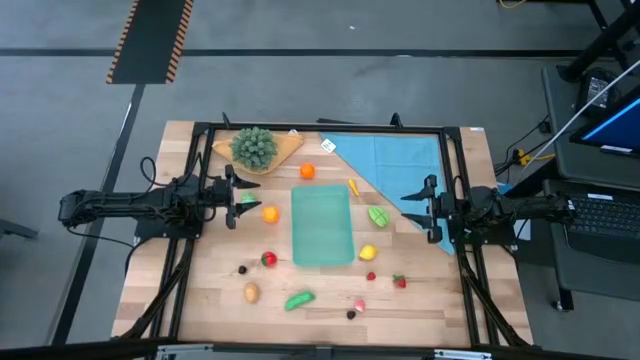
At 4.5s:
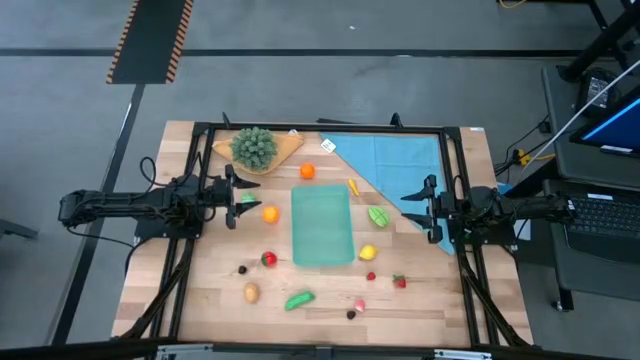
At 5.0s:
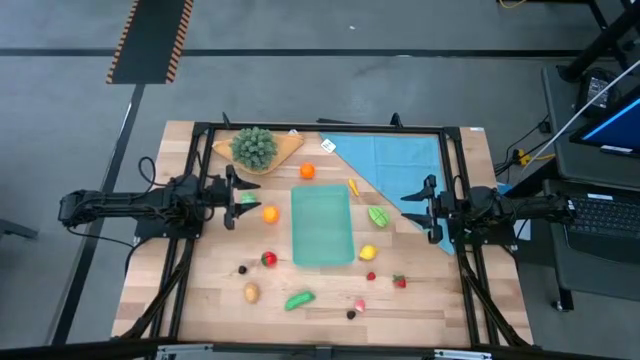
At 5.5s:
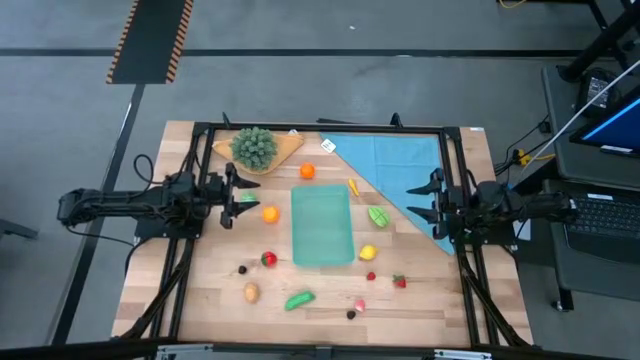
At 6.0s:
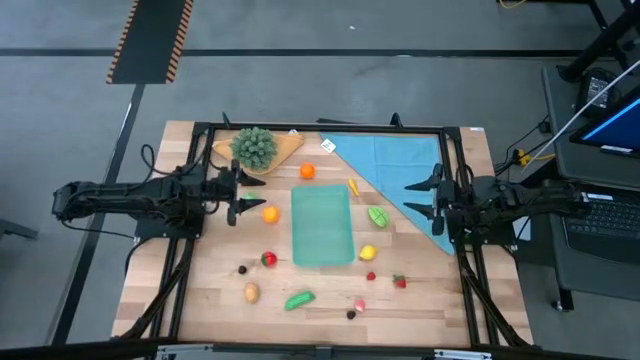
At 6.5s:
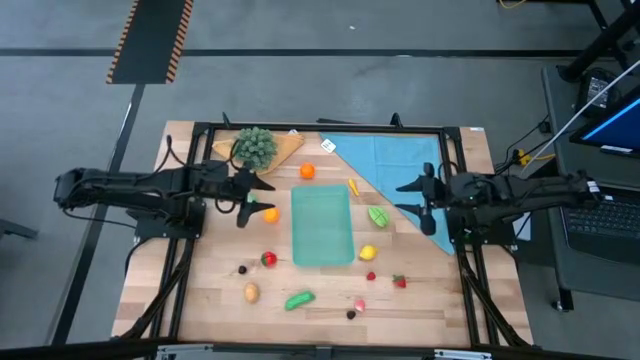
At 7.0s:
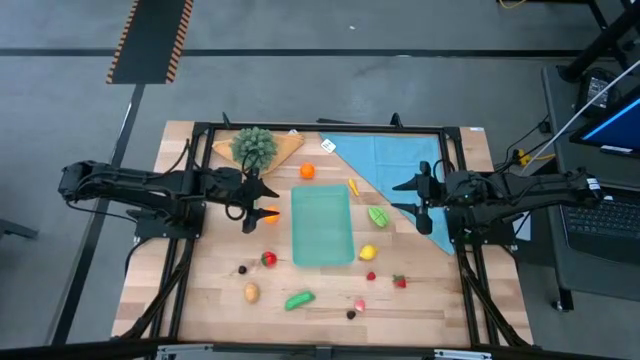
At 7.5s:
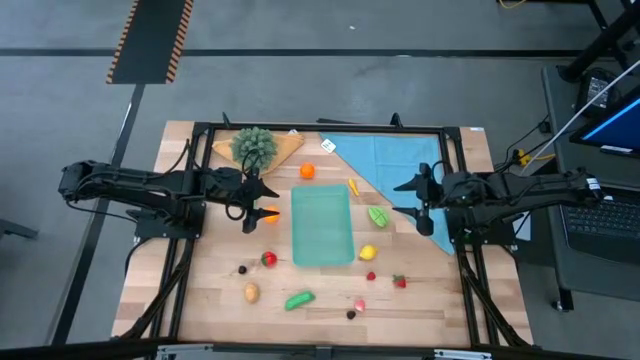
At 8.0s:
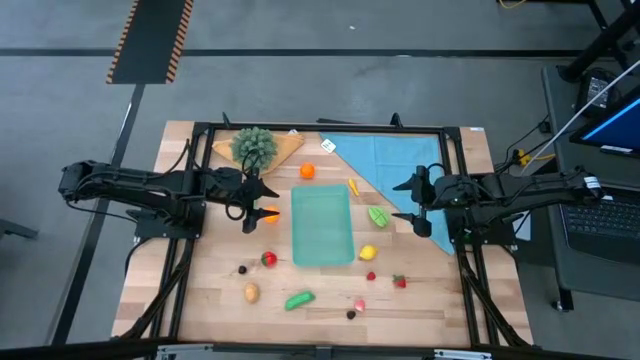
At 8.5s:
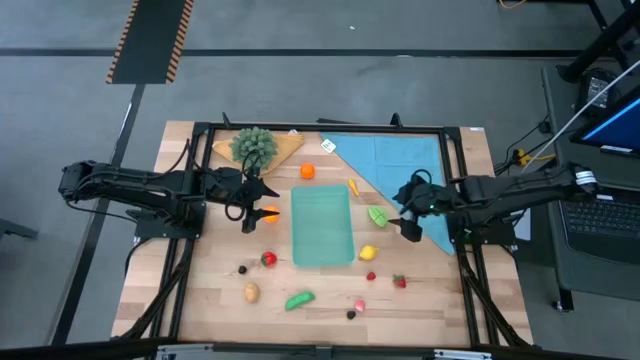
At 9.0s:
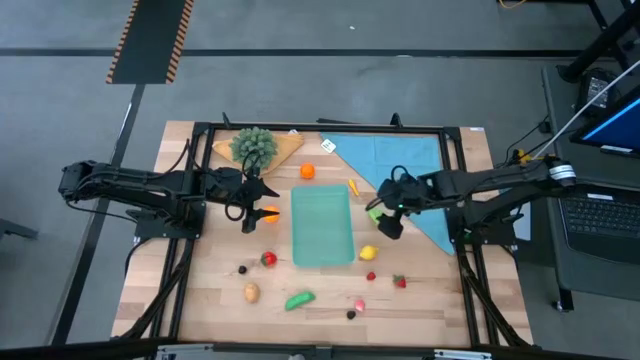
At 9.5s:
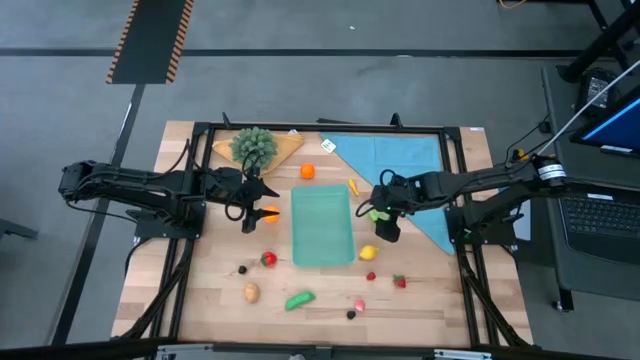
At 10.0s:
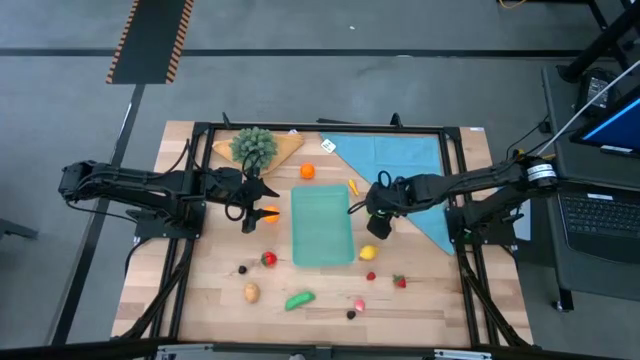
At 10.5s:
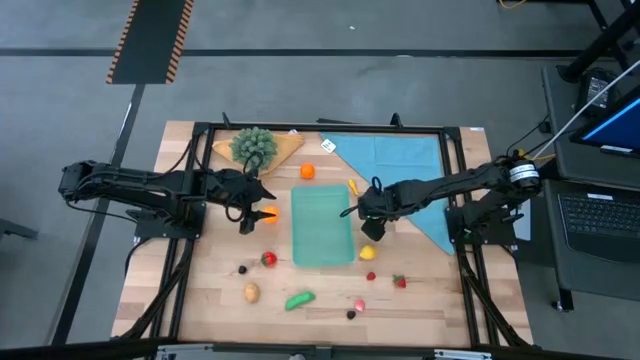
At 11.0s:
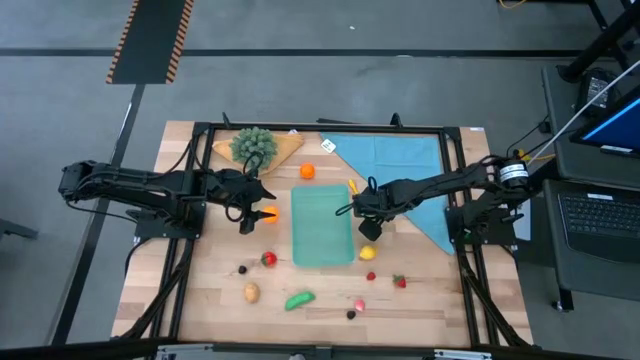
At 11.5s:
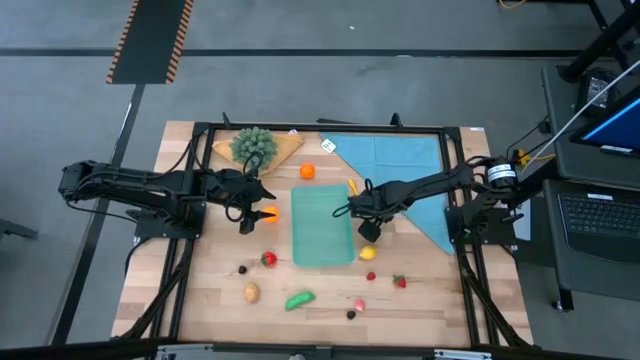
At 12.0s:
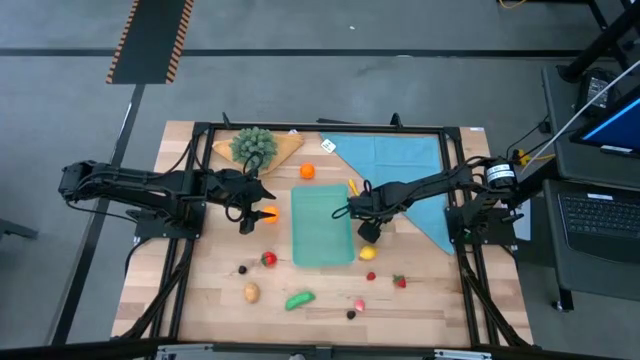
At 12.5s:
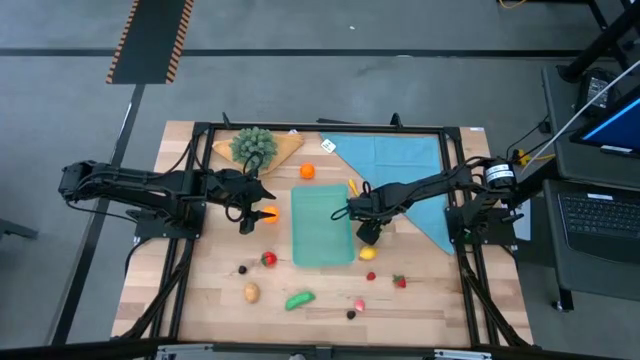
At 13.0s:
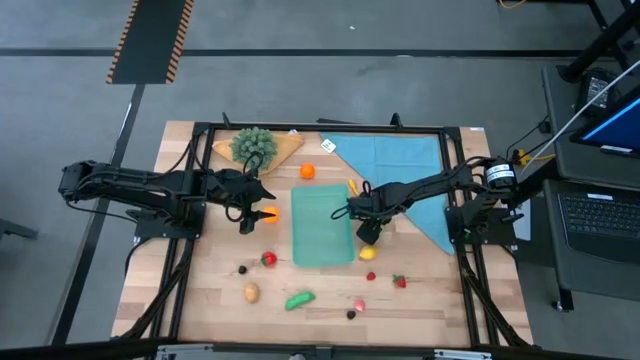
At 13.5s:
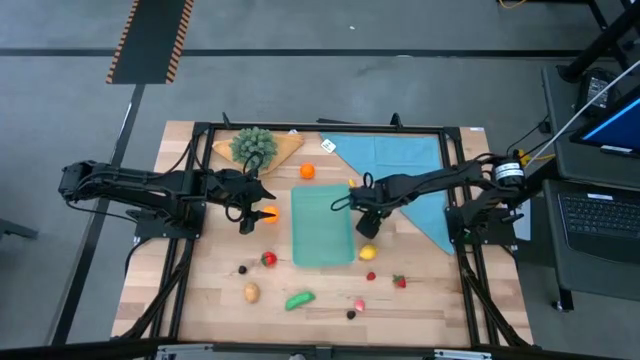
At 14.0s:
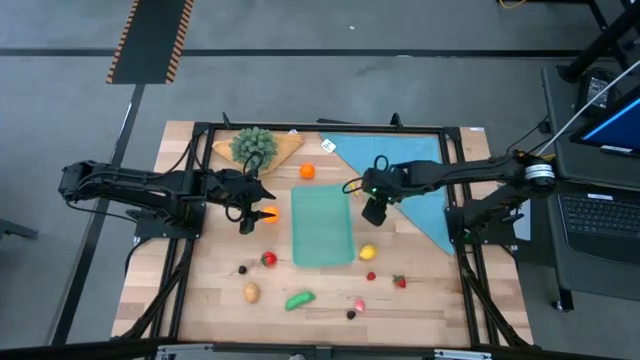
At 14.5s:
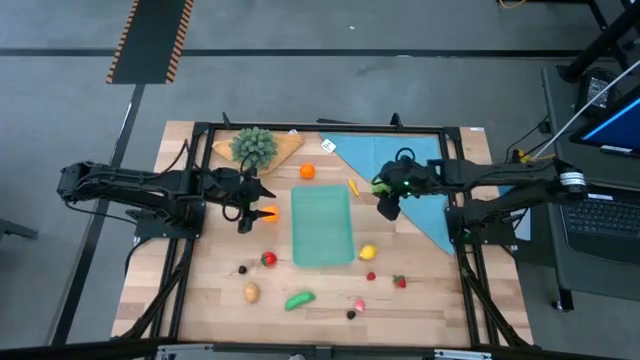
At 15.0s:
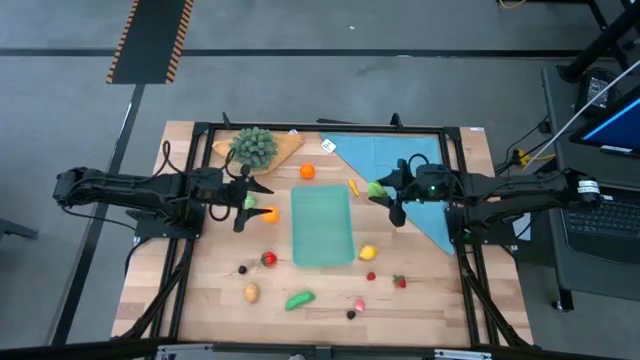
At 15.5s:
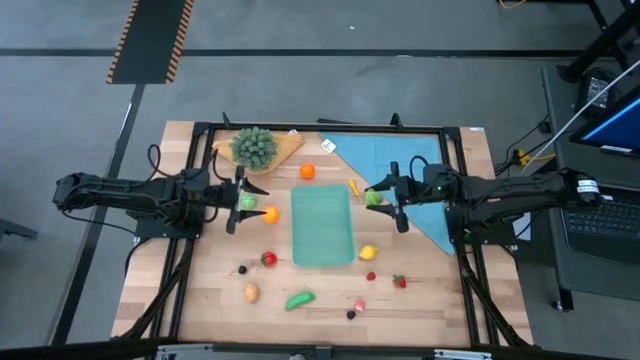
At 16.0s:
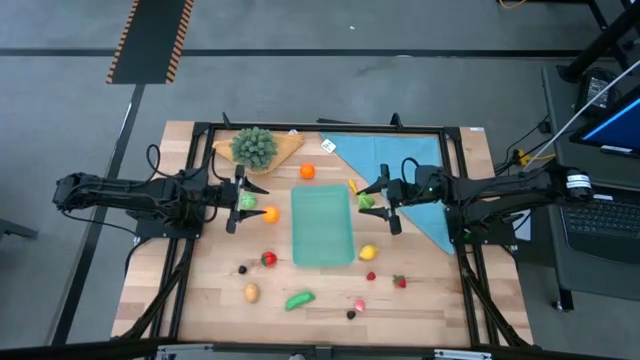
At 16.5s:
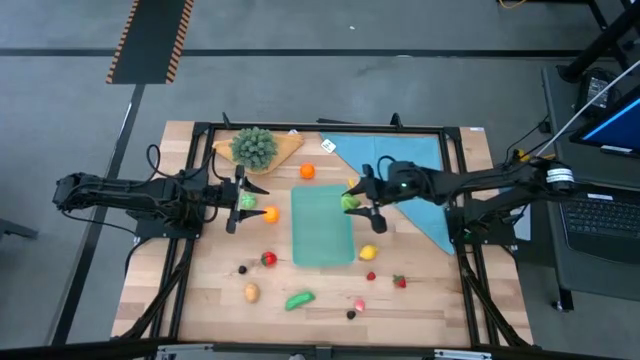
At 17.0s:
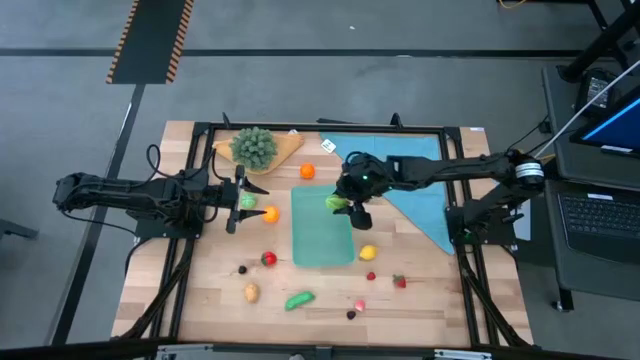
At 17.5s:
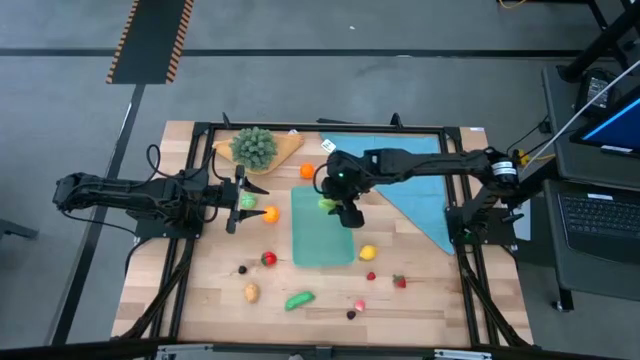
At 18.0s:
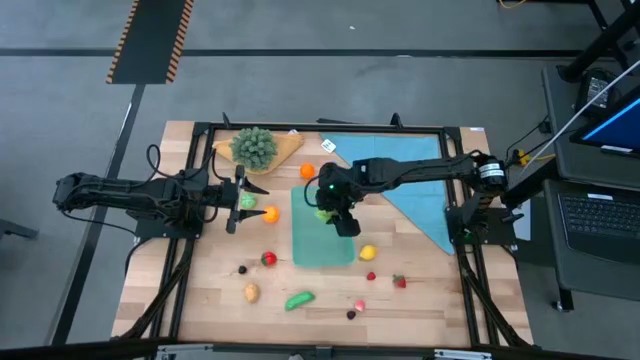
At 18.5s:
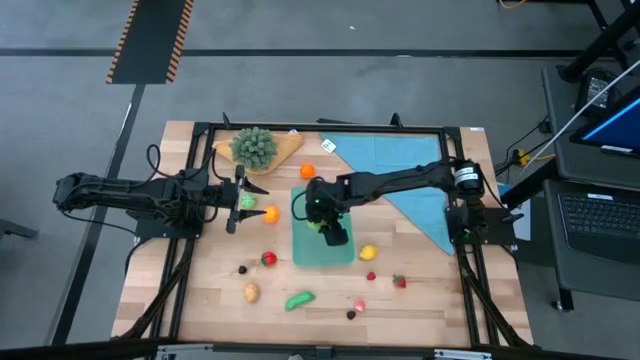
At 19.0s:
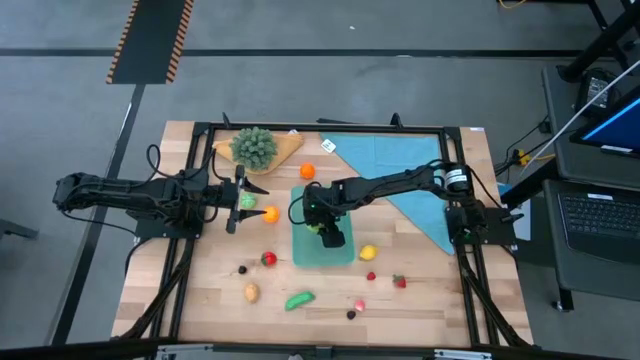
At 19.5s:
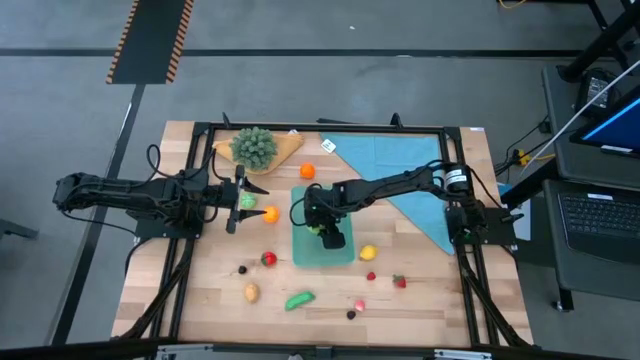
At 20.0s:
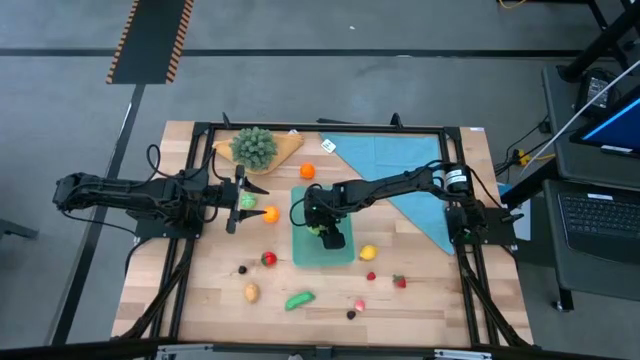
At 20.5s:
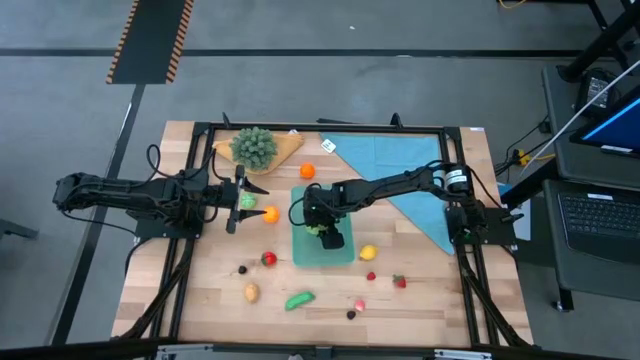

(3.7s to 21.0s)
Task: Pick and placing Produce into tupperware
Put the starfruit into the bin

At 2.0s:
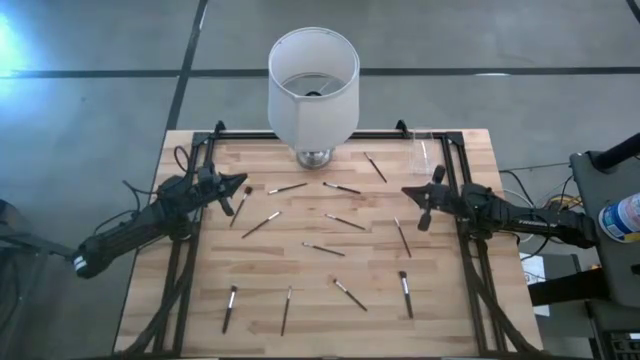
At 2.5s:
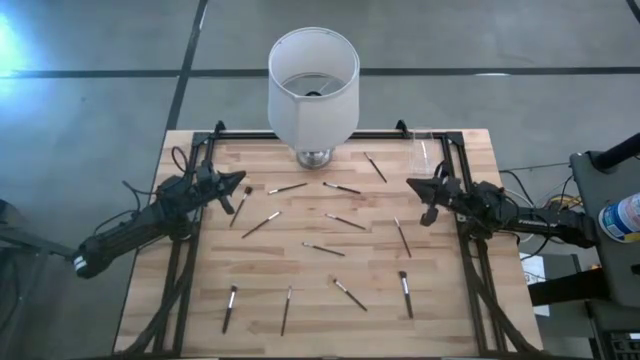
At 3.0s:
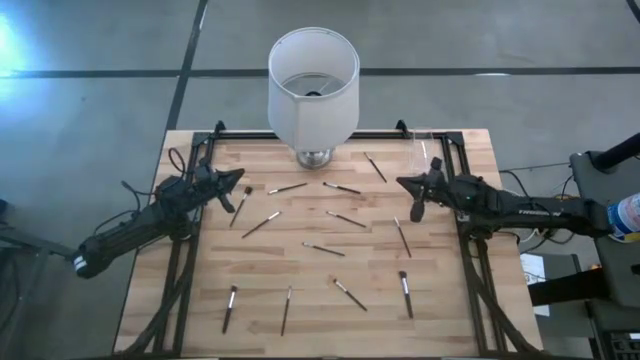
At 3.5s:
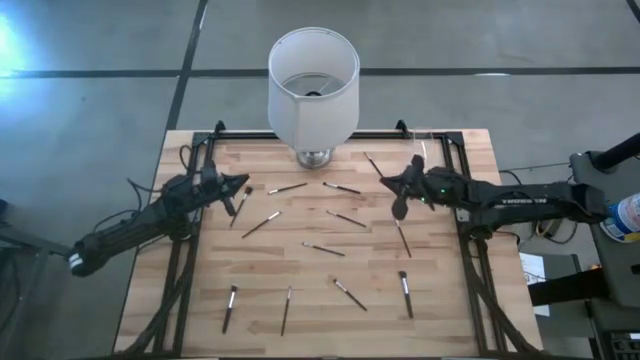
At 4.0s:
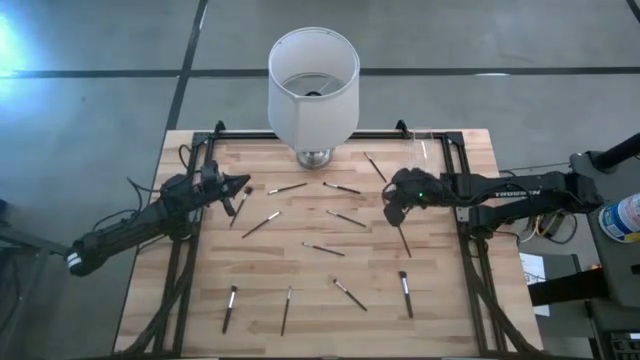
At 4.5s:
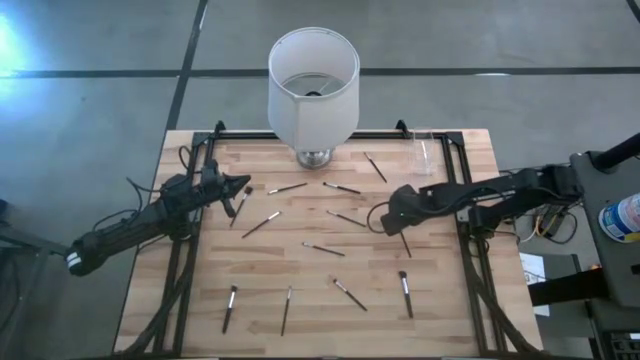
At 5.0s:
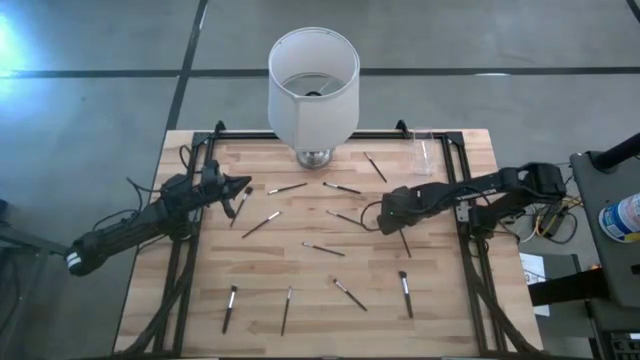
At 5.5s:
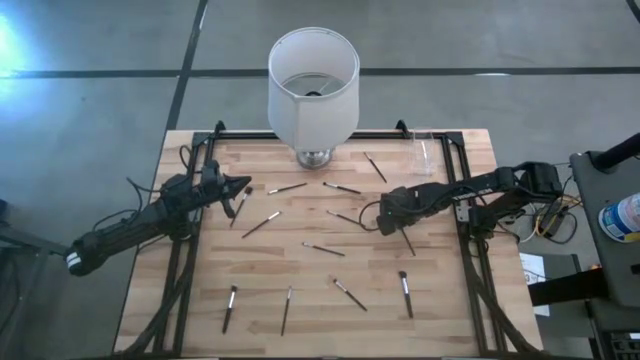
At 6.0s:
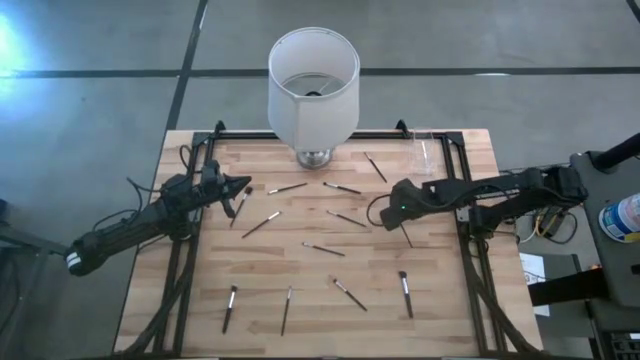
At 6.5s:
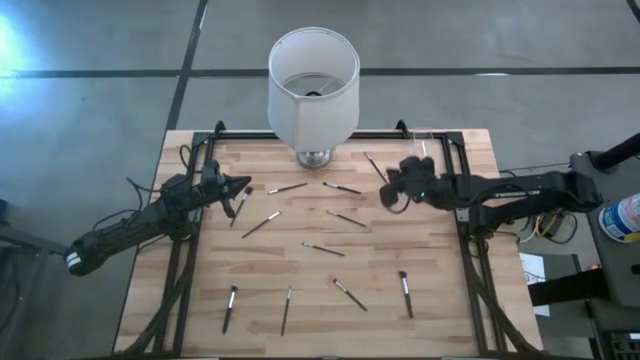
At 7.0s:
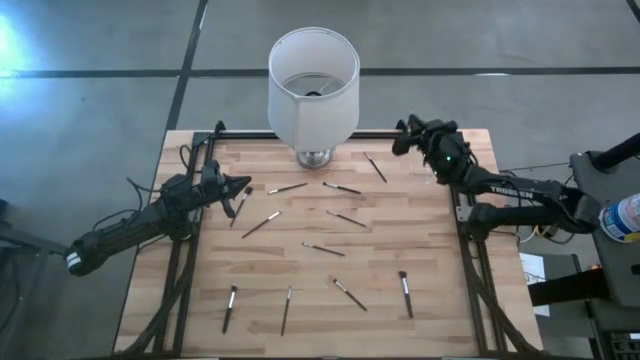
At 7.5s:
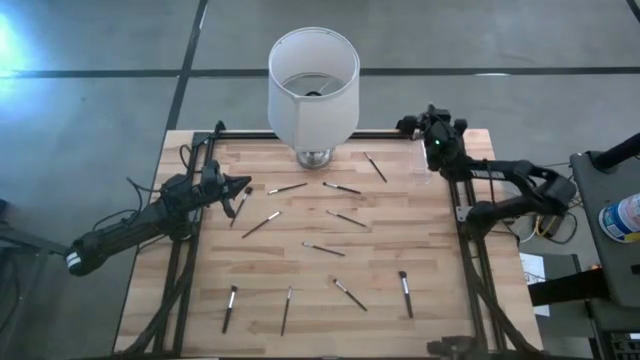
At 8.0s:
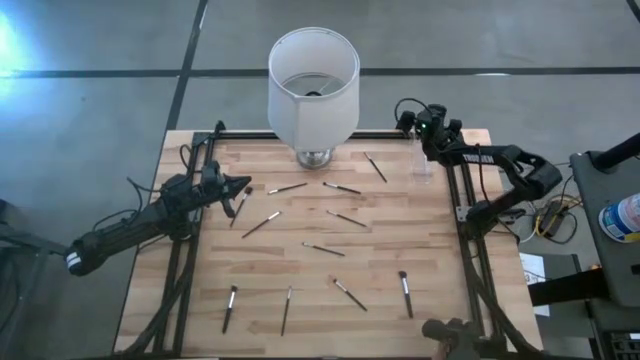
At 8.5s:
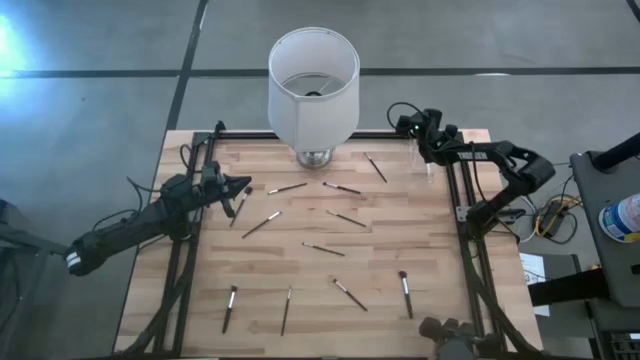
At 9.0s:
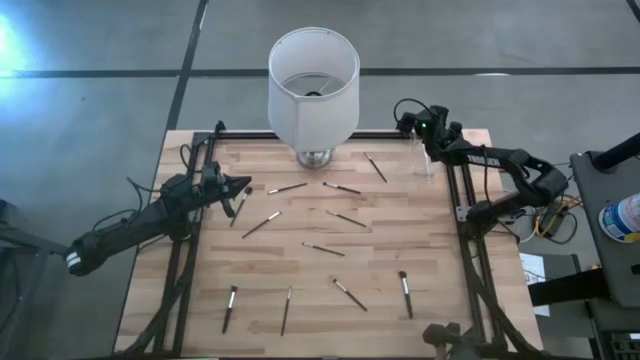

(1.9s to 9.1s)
Task: Put items in baskets/containers
Put the eyeshadow brush into the transparent organizer
